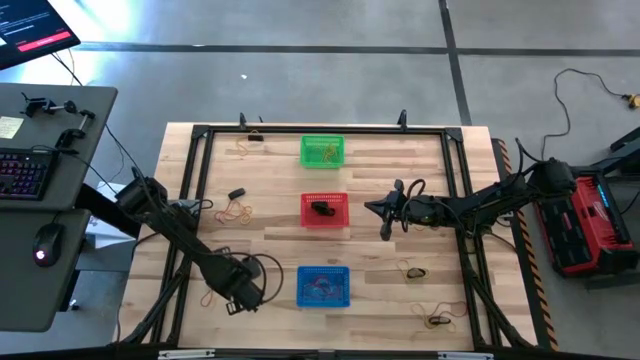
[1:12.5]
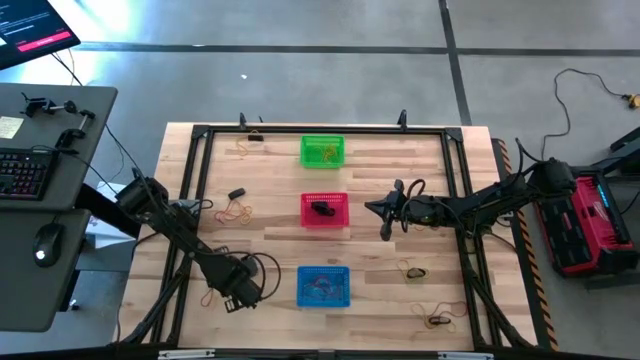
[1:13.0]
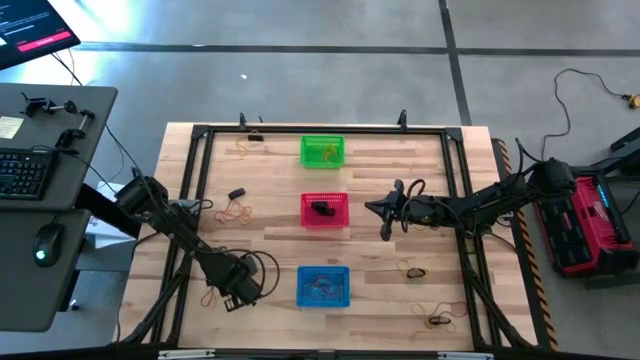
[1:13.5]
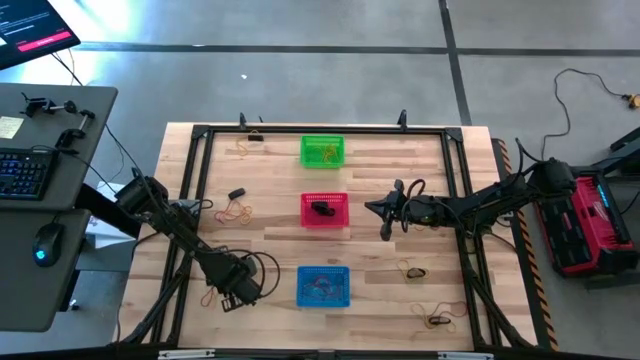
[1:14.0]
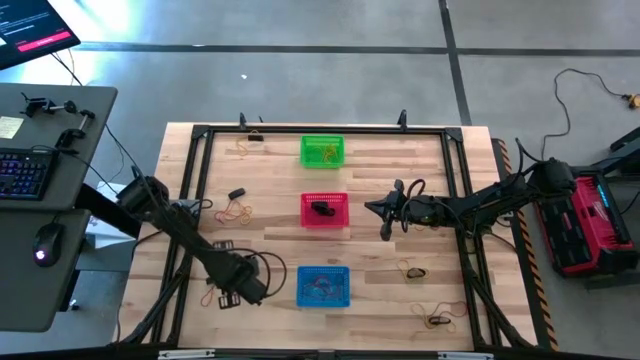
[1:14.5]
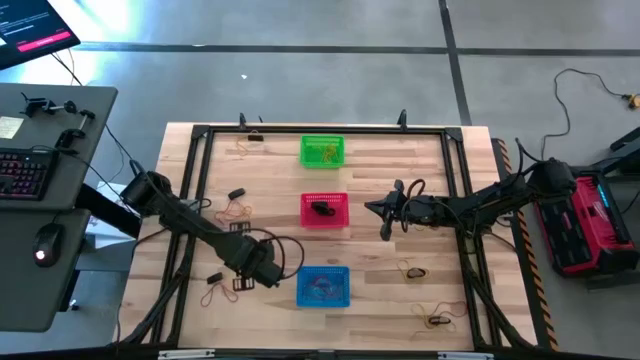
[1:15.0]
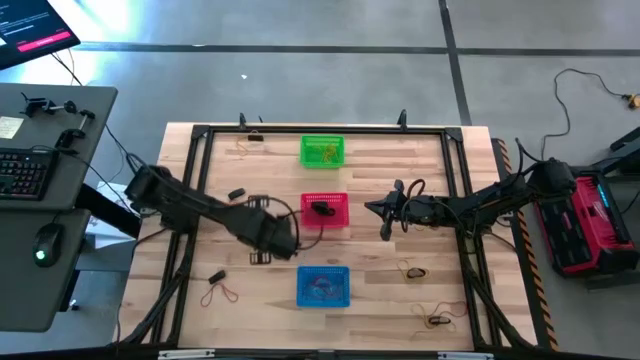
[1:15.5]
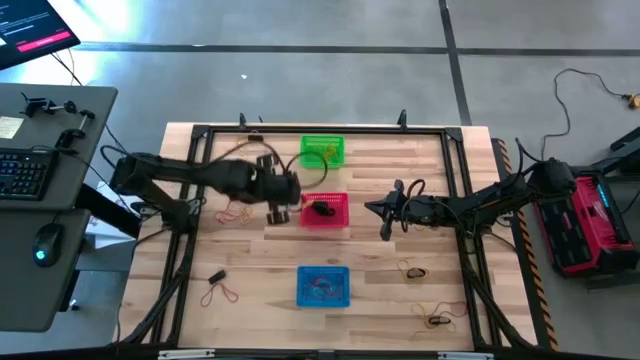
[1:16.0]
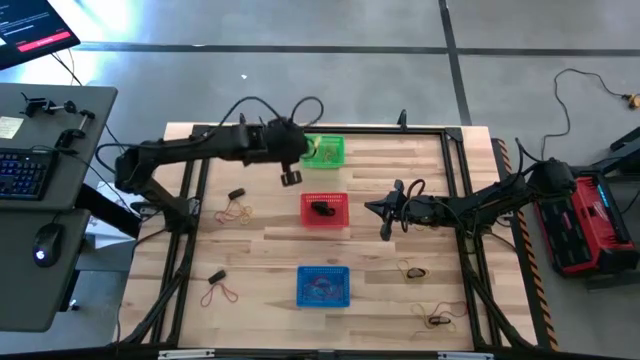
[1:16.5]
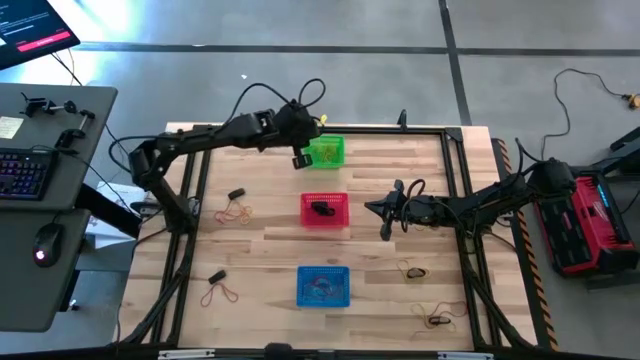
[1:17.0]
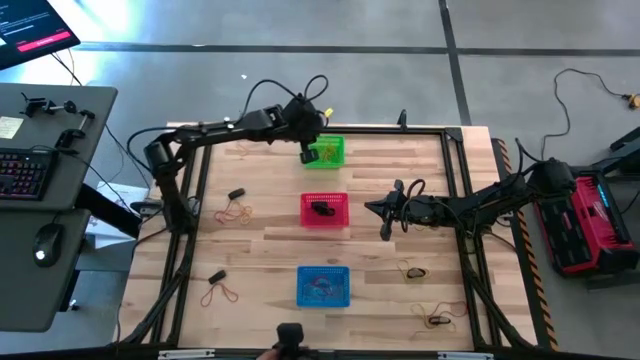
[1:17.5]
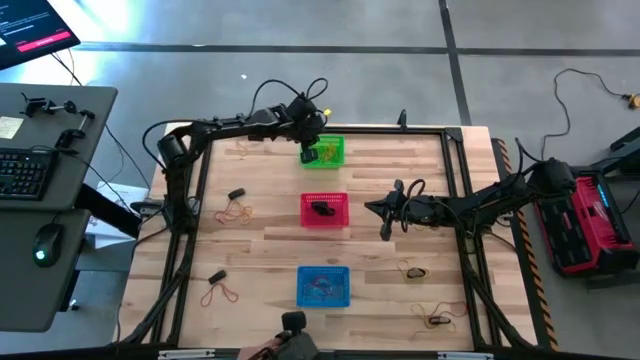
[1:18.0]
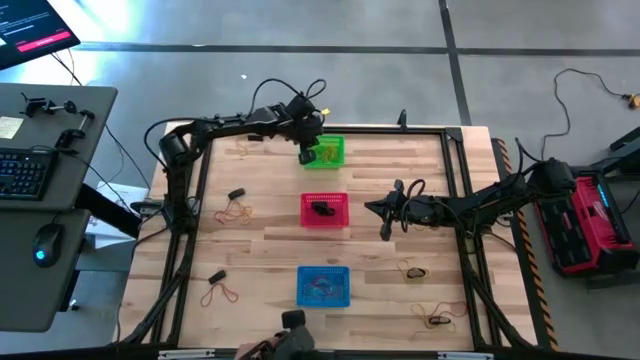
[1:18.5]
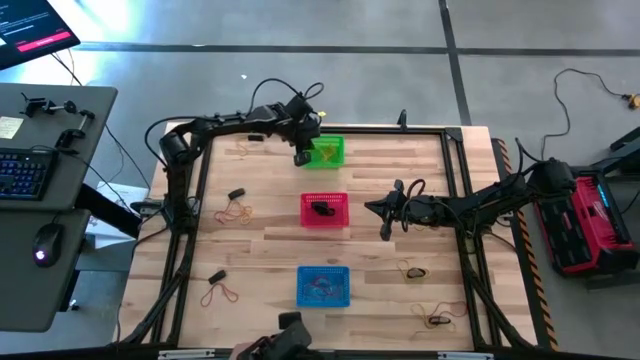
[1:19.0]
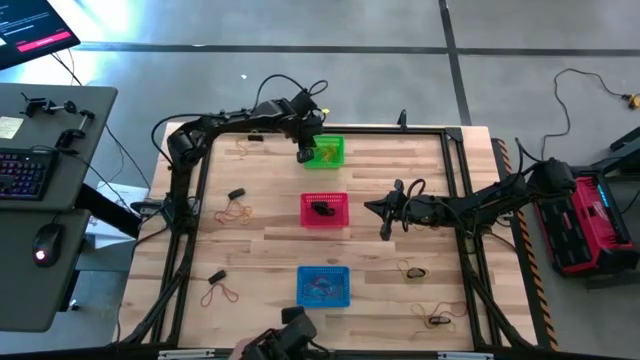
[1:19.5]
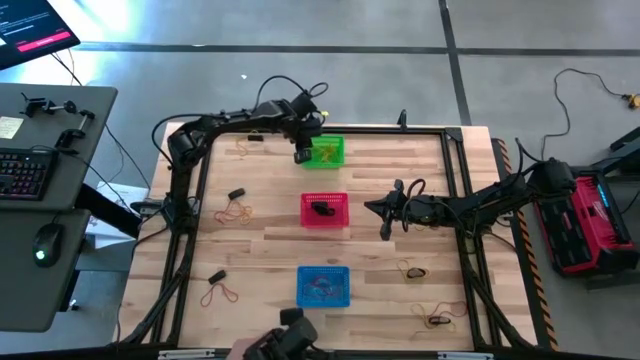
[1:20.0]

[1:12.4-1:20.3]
Task: Sort rubber bands into baskets
Put the yellow rubber band into the green bin

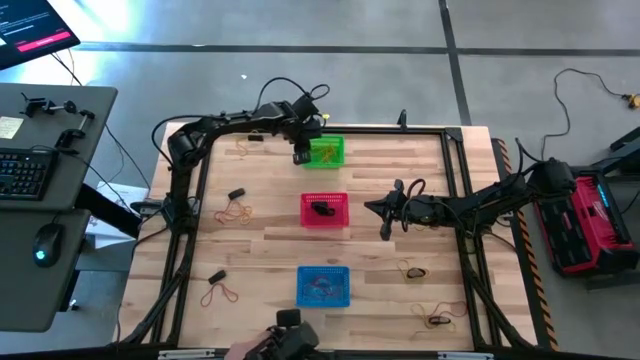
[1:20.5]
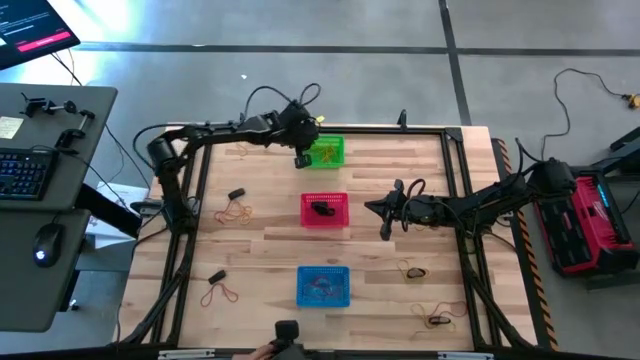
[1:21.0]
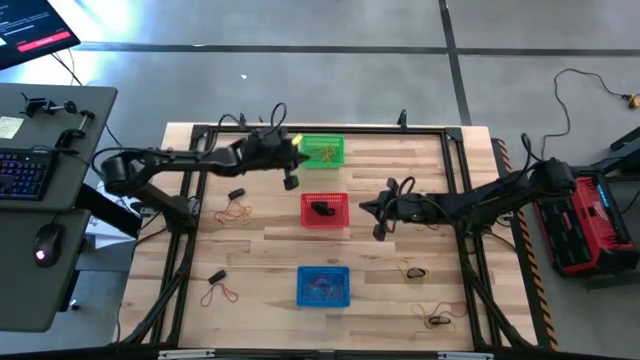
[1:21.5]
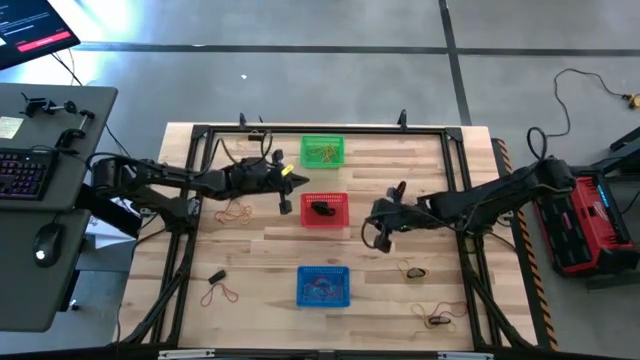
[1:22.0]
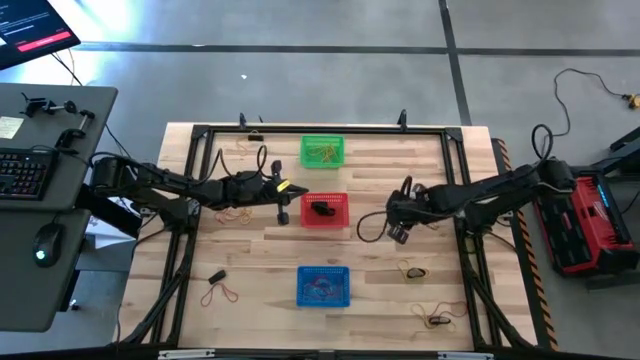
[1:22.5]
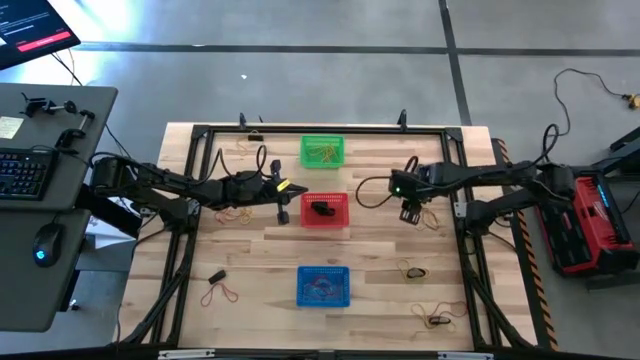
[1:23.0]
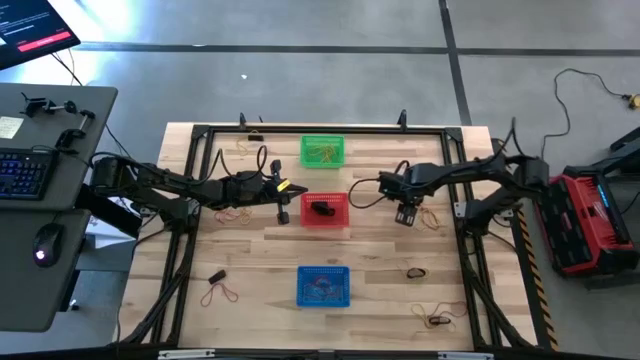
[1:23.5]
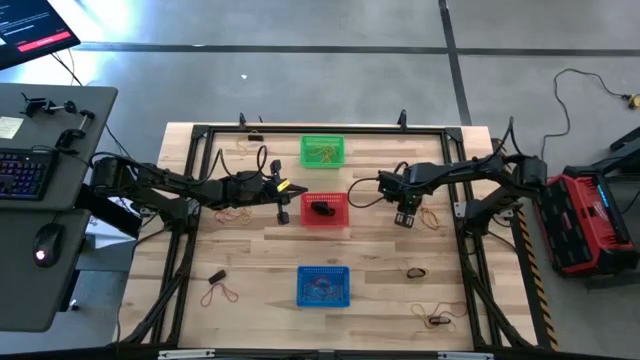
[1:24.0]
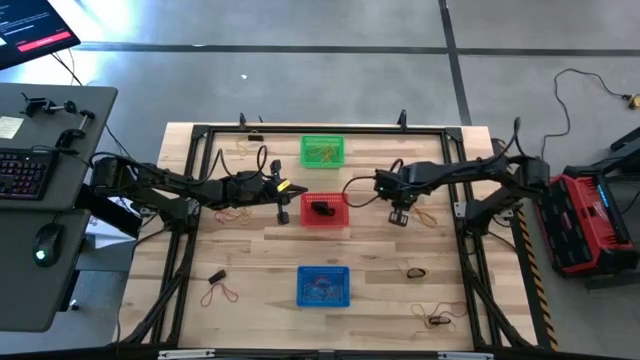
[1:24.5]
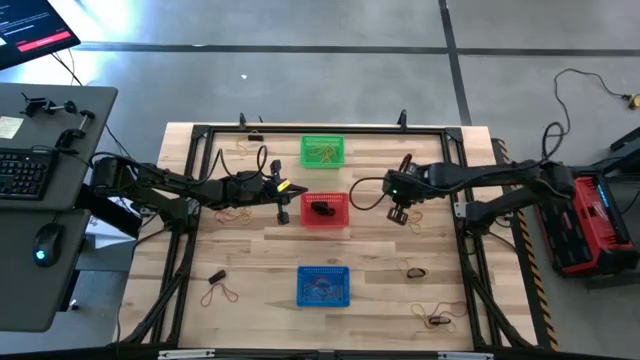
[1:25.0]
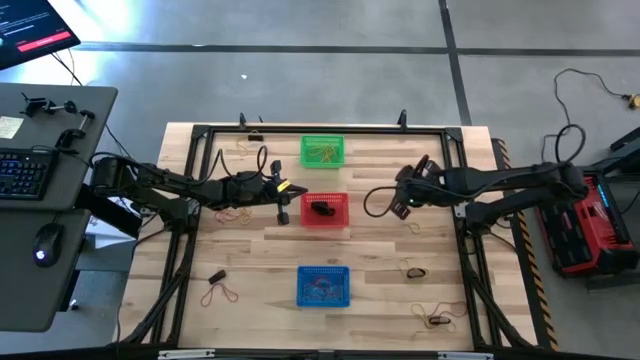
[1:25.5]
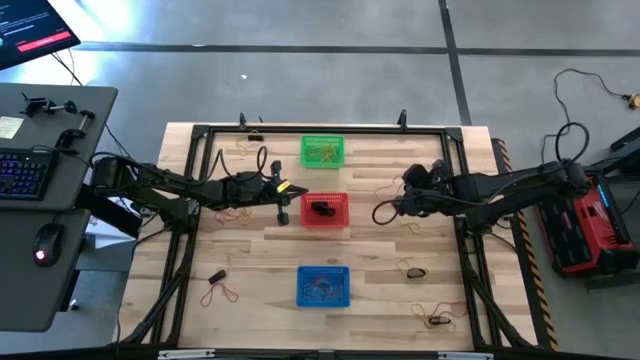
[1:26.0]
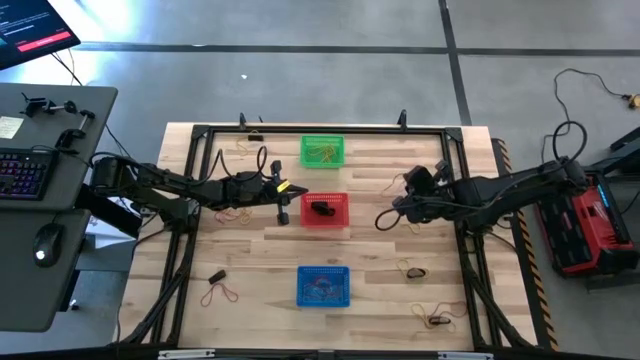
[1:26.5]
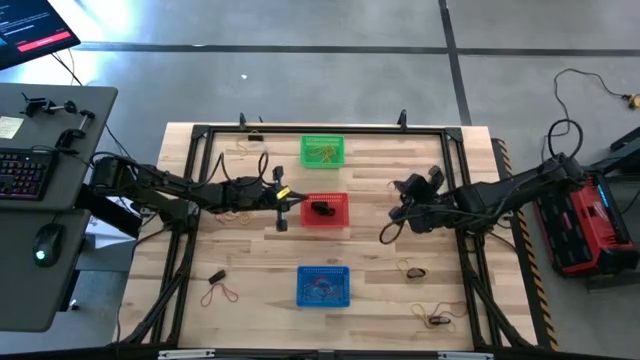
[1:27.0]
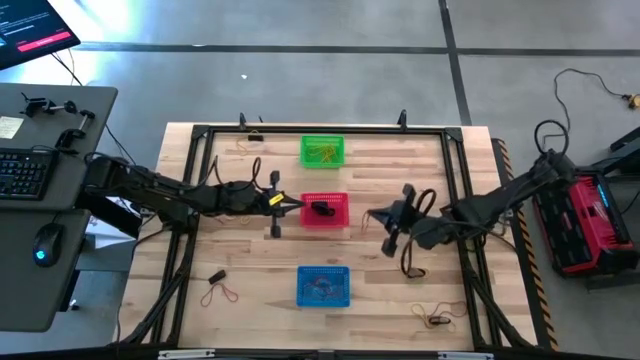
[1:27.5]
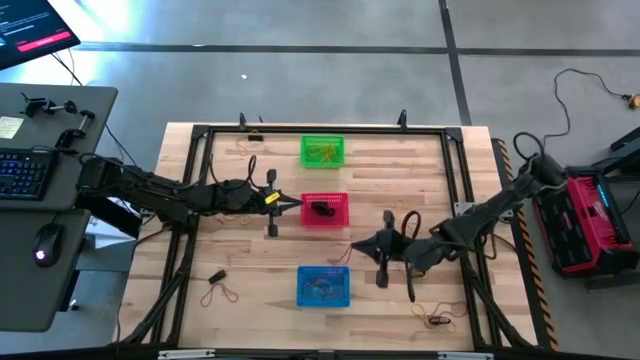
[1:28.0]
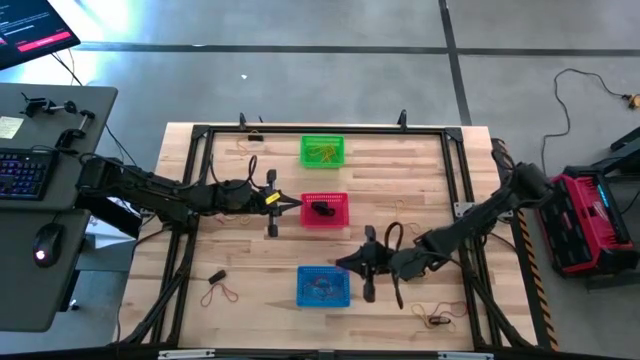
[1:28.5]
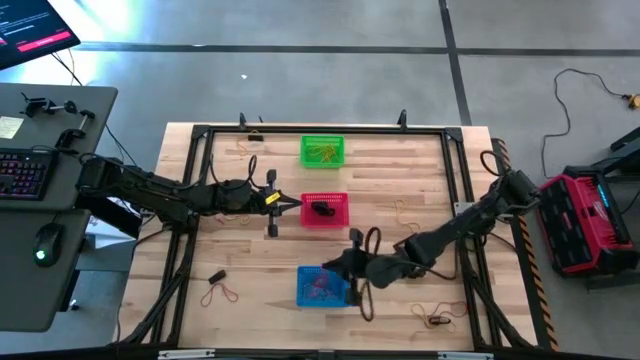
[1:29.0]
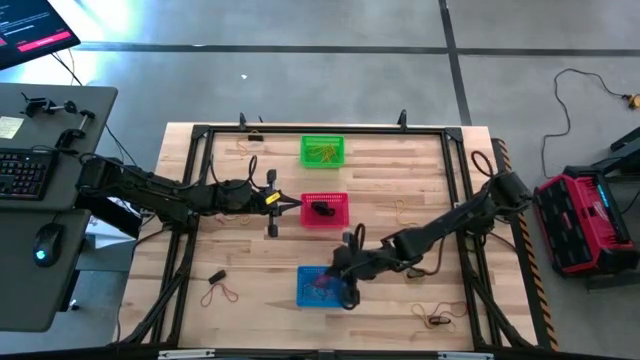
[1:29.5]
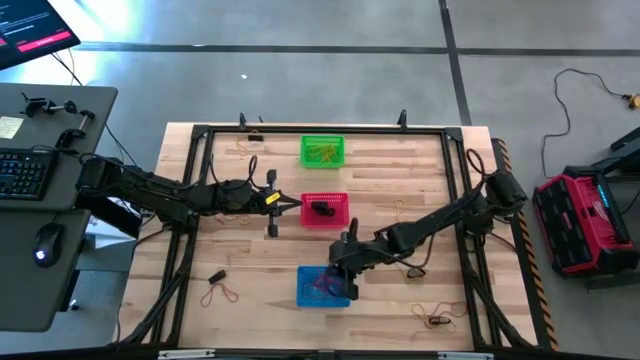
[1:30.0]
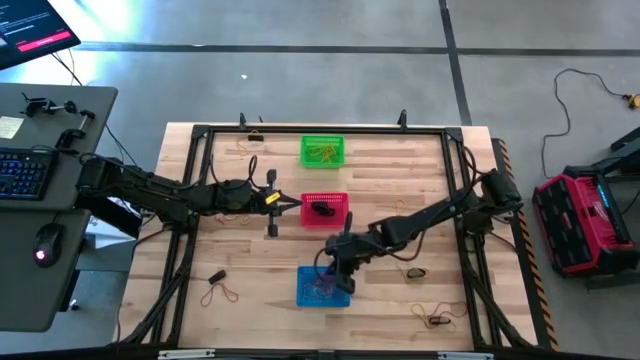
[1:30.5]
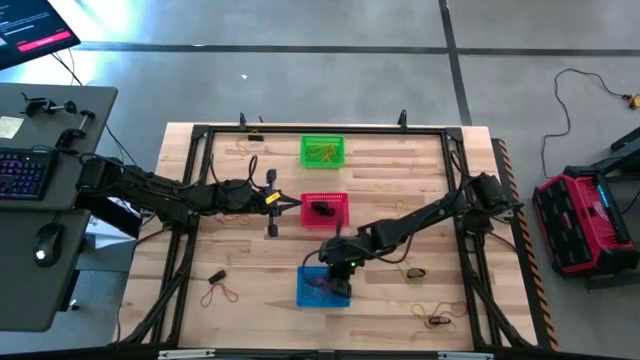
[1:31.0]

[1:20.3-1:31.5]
Put the red rubber band into the blue bin

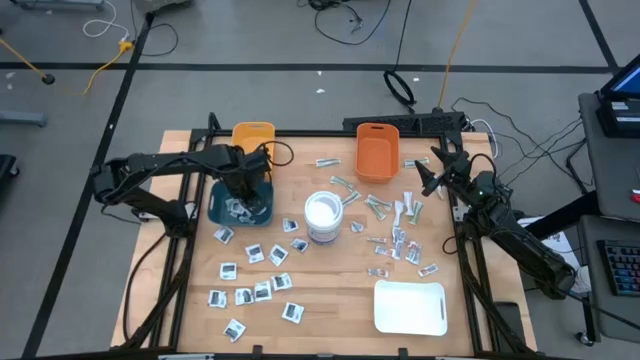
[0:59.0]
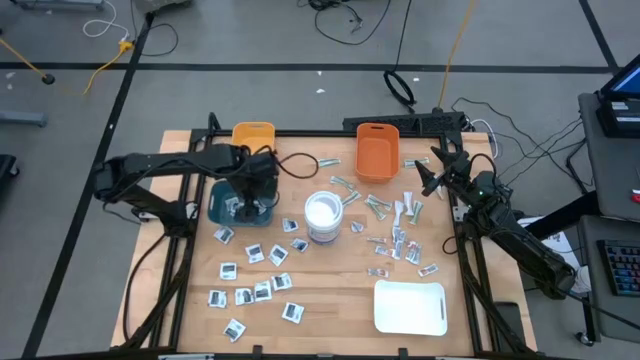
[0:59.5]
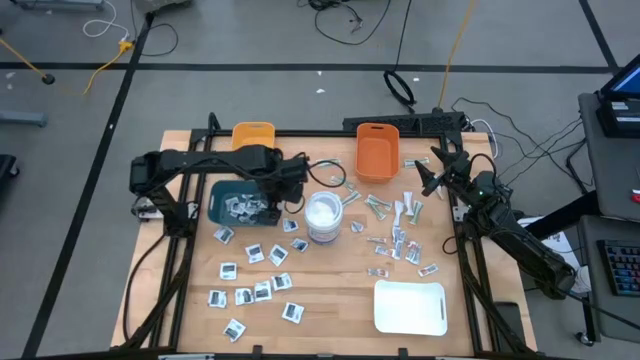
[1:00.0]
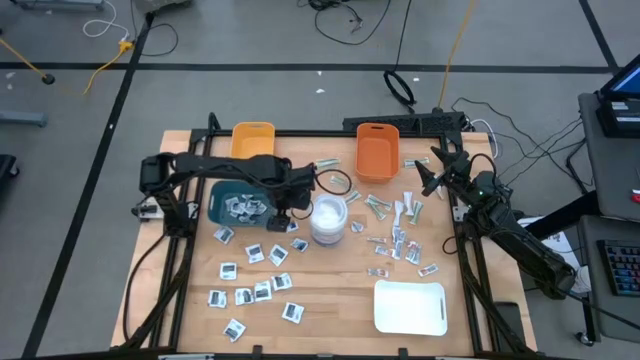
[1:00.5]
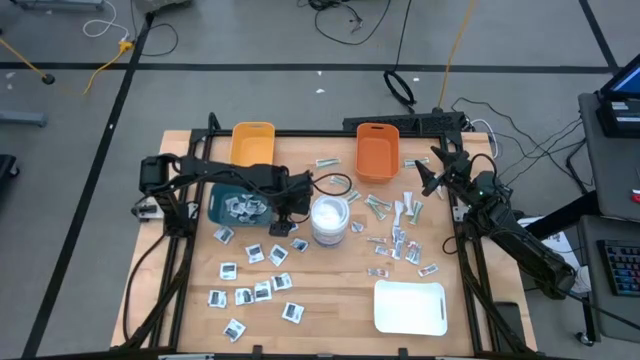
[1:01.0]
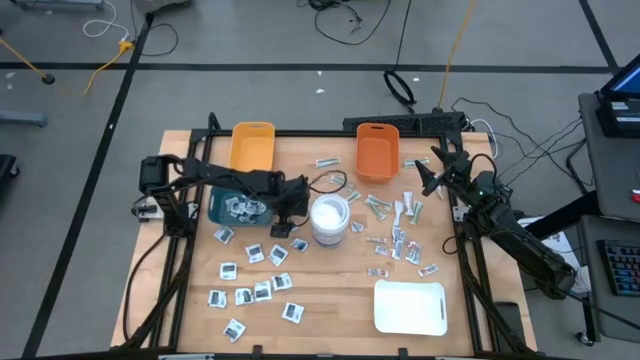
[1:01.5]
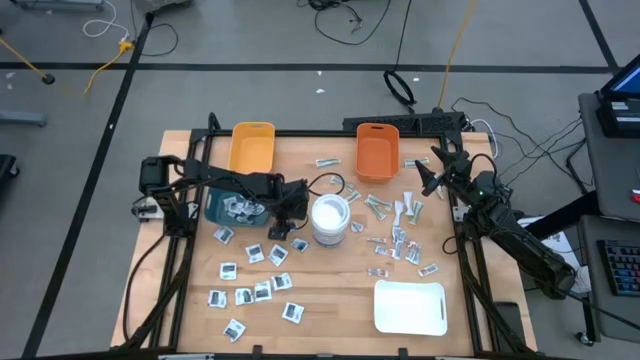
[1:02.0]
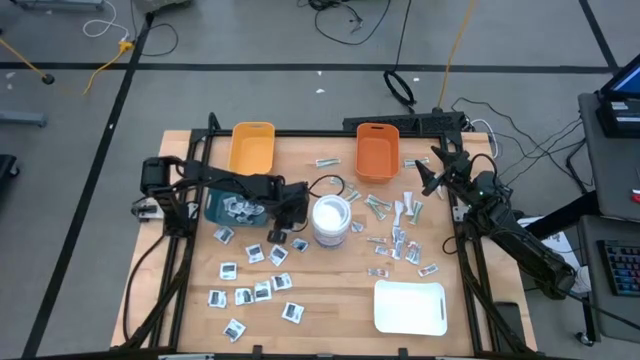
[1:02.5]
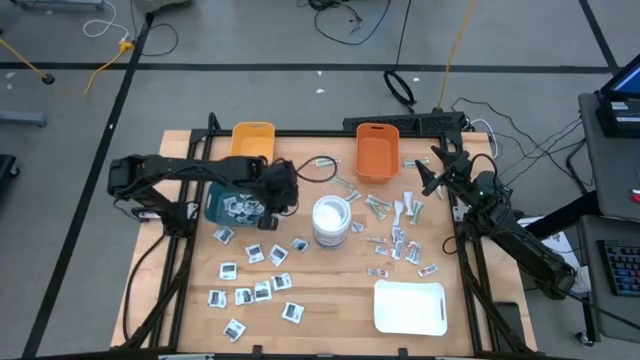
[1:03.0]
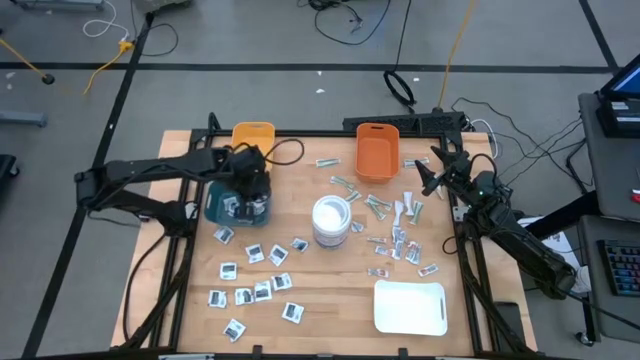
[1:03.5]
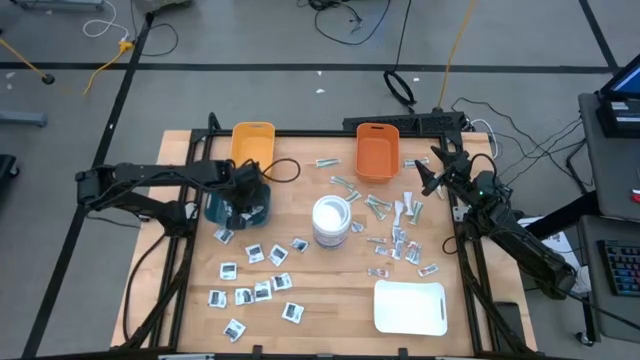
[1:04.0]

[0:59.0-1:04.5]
Task: Pick & Place First Aid Supplies
Put the blue pad into the blue bin
